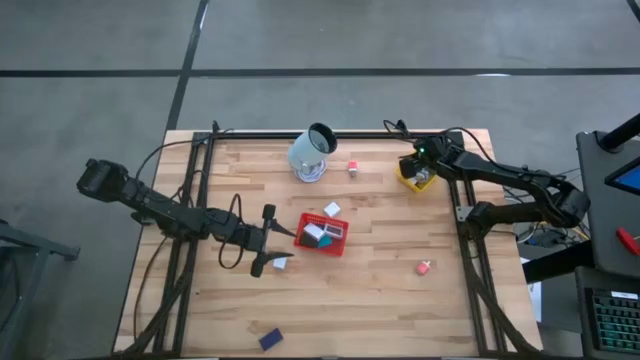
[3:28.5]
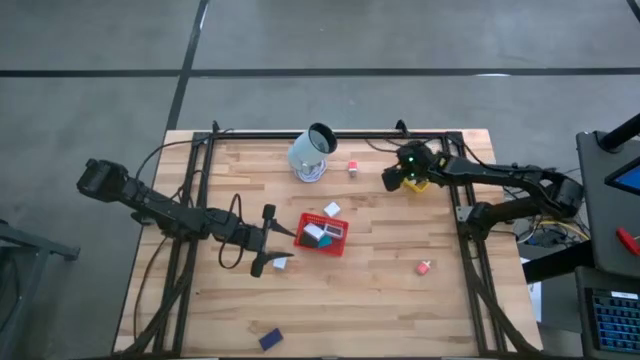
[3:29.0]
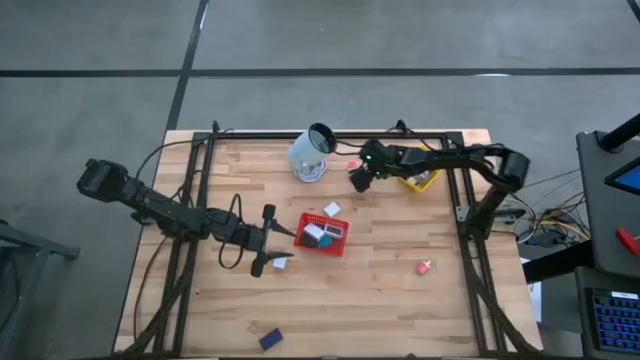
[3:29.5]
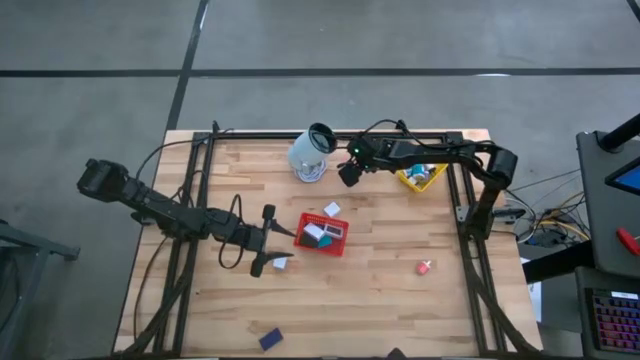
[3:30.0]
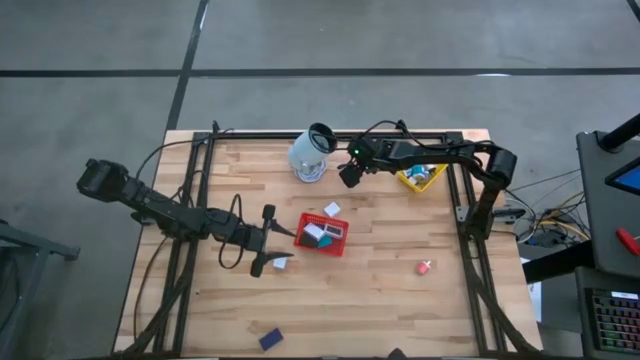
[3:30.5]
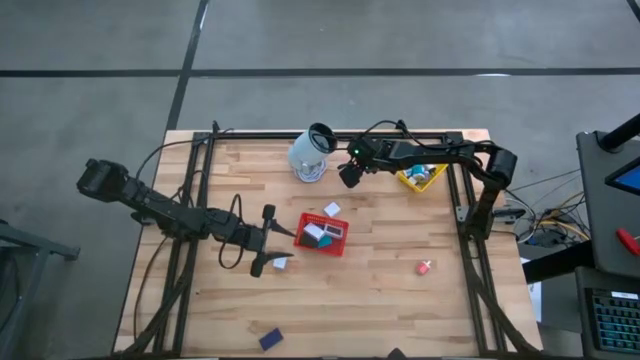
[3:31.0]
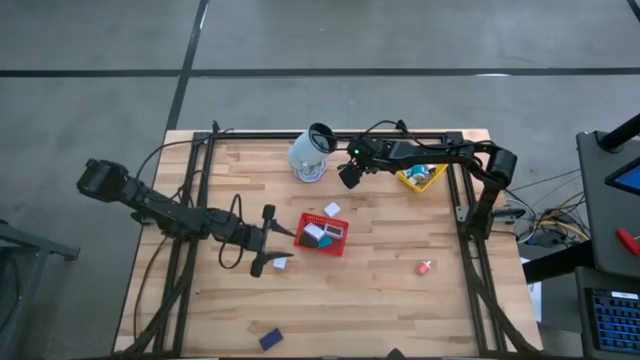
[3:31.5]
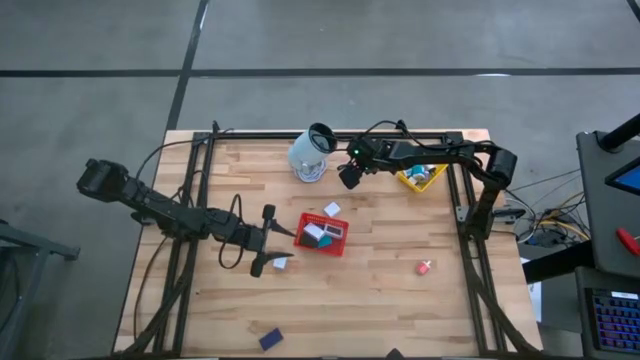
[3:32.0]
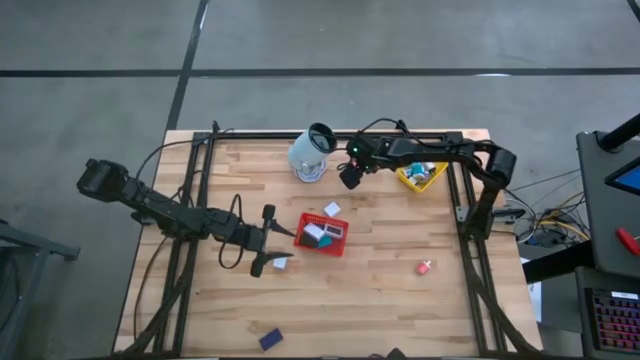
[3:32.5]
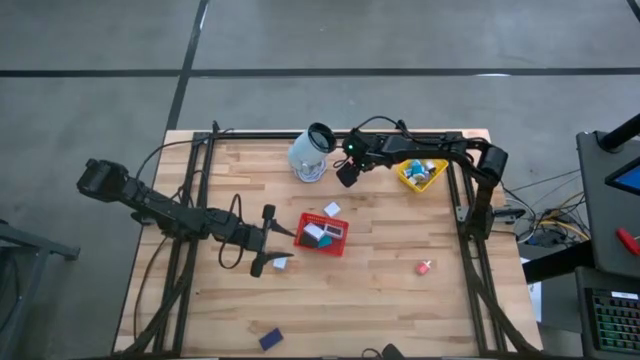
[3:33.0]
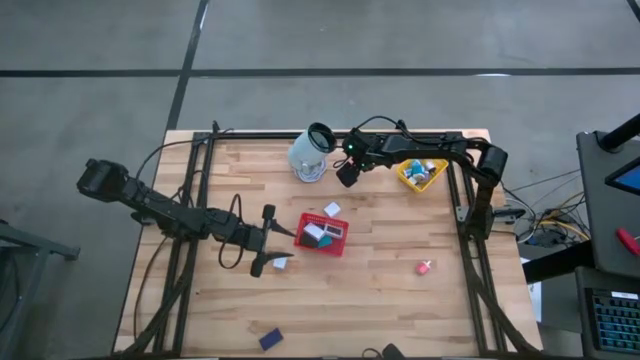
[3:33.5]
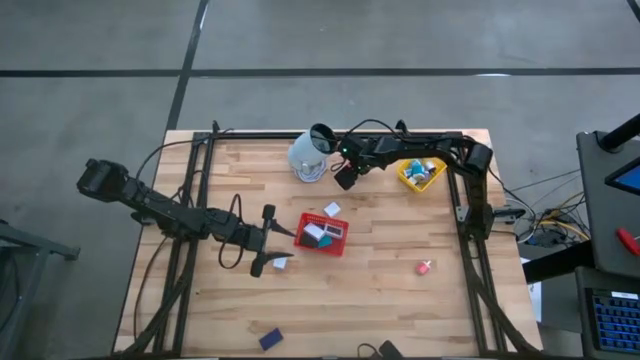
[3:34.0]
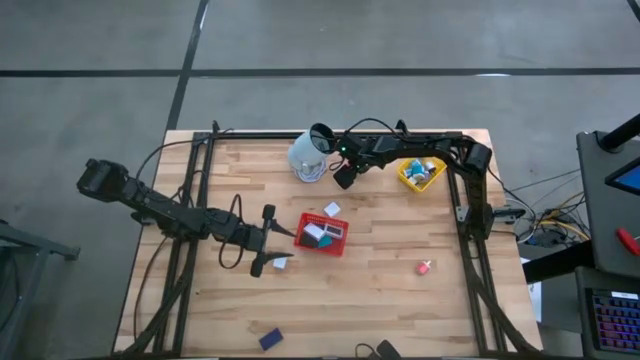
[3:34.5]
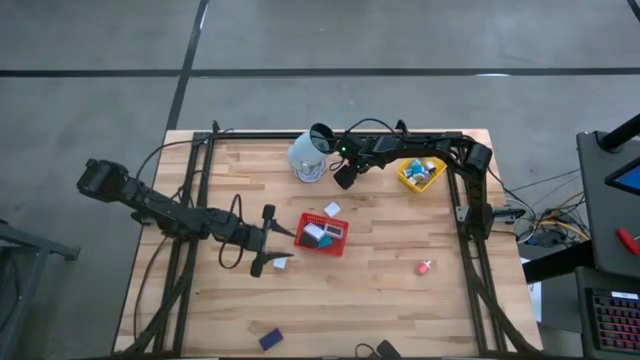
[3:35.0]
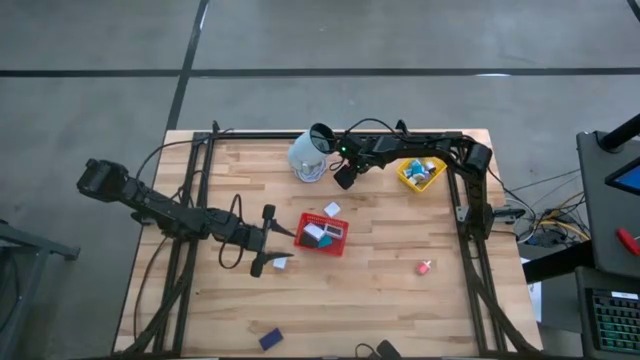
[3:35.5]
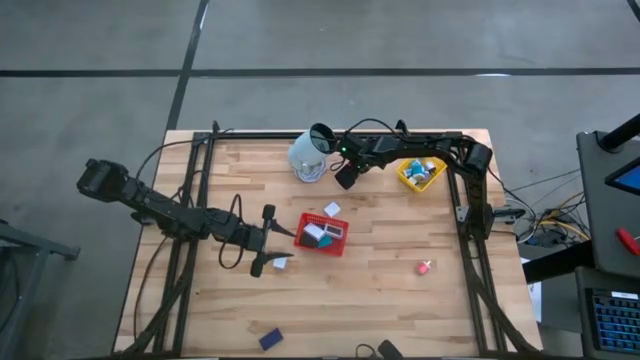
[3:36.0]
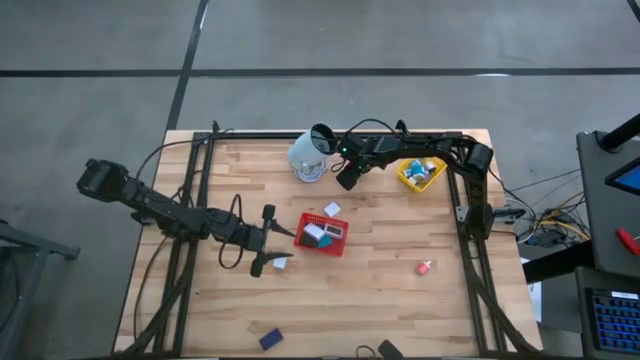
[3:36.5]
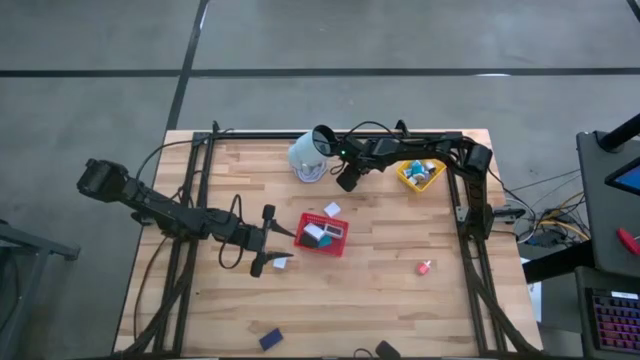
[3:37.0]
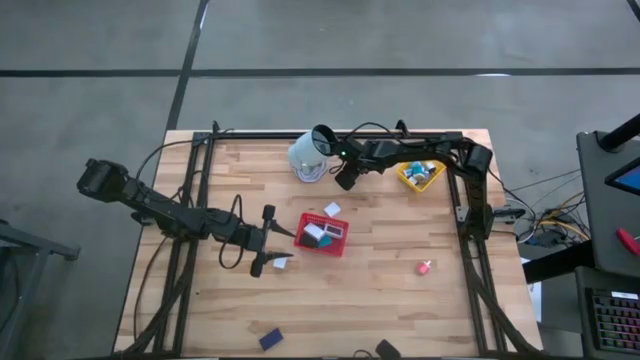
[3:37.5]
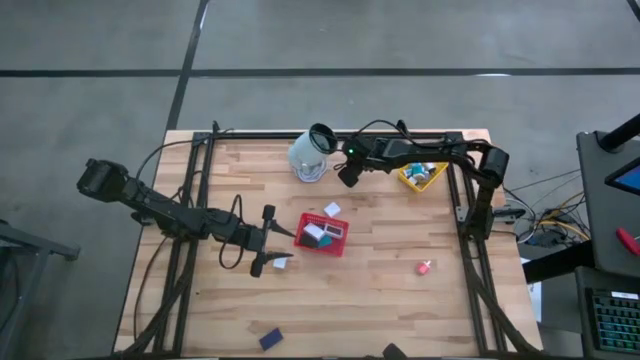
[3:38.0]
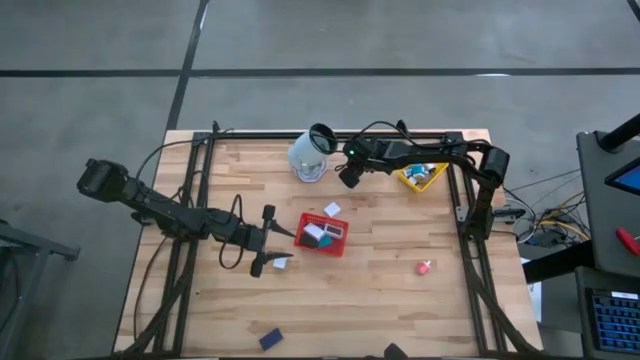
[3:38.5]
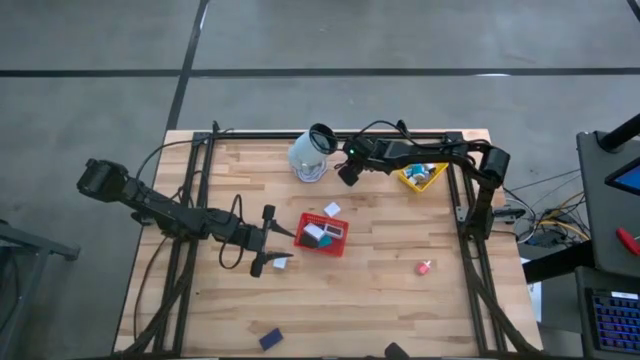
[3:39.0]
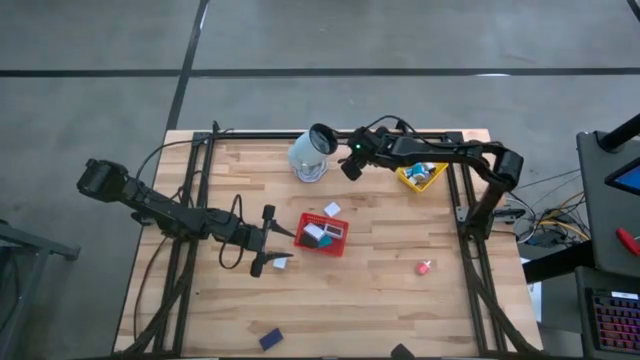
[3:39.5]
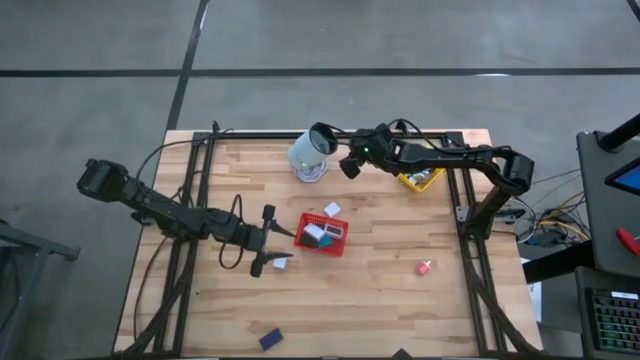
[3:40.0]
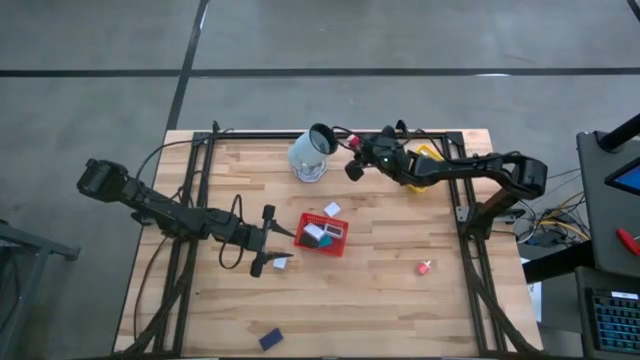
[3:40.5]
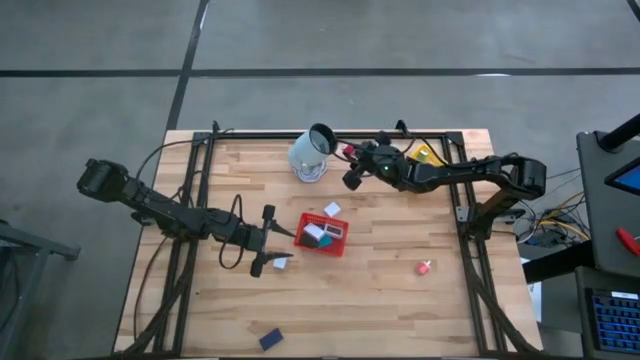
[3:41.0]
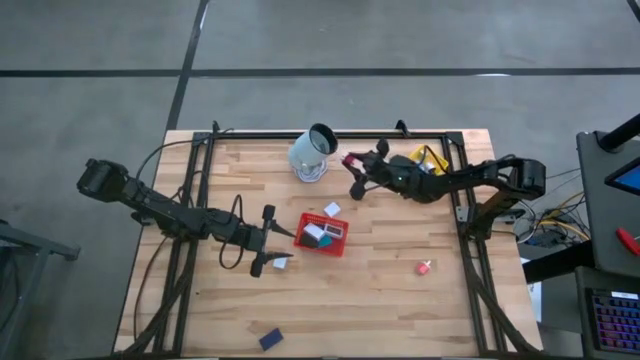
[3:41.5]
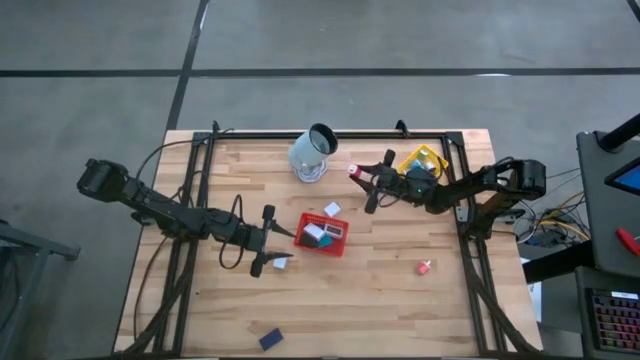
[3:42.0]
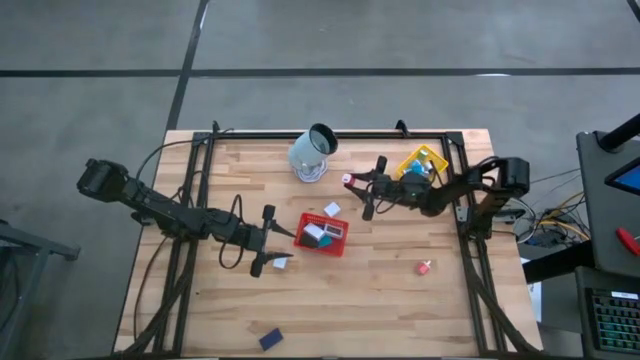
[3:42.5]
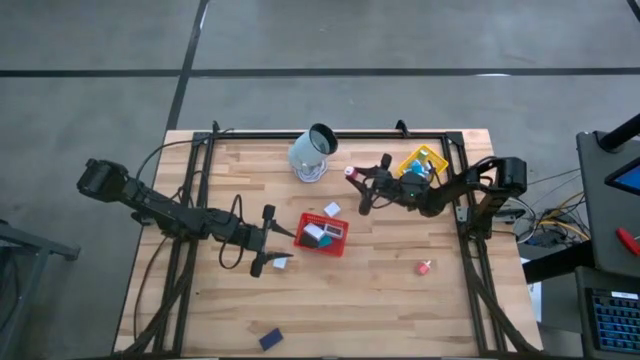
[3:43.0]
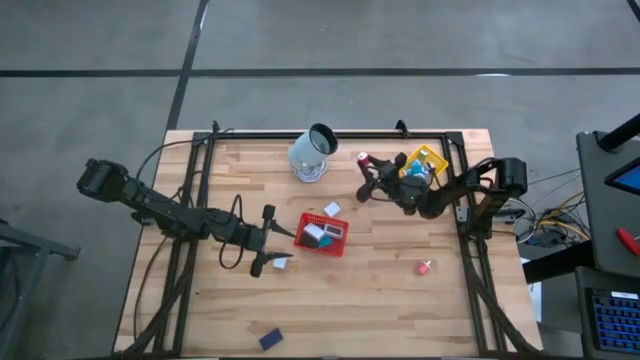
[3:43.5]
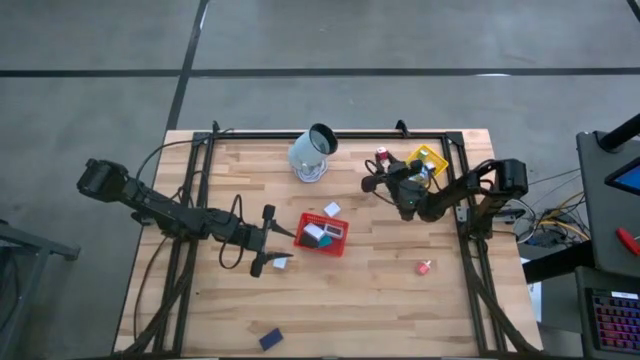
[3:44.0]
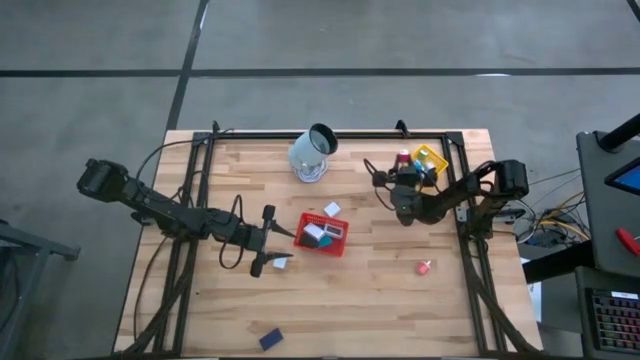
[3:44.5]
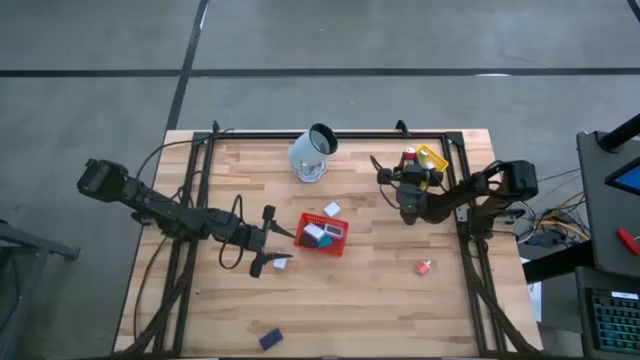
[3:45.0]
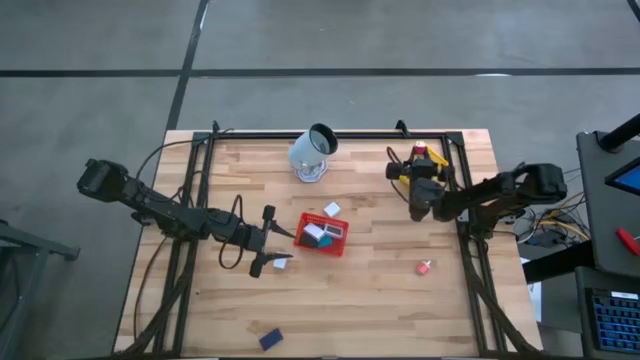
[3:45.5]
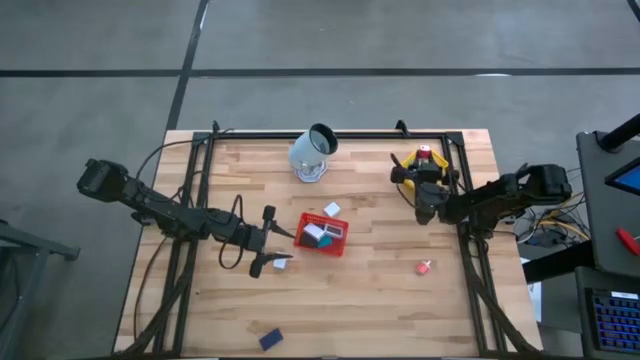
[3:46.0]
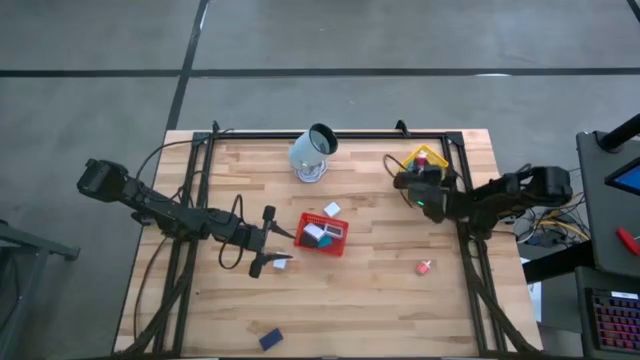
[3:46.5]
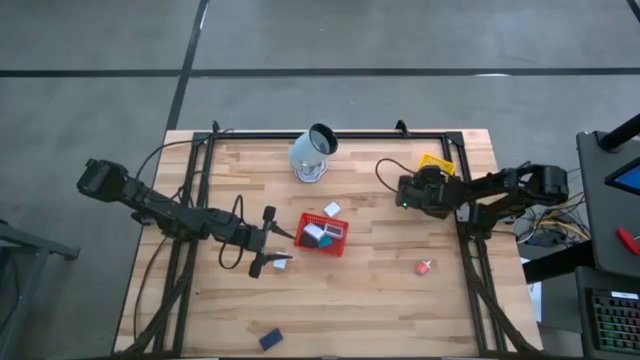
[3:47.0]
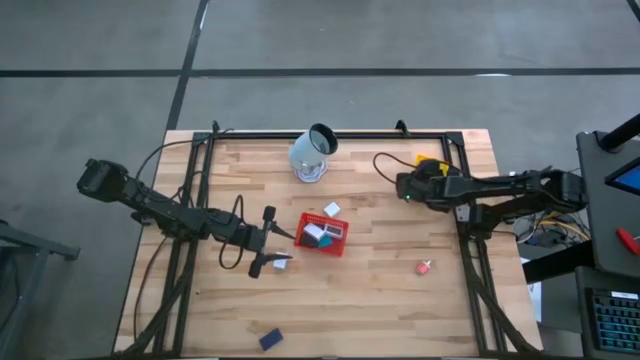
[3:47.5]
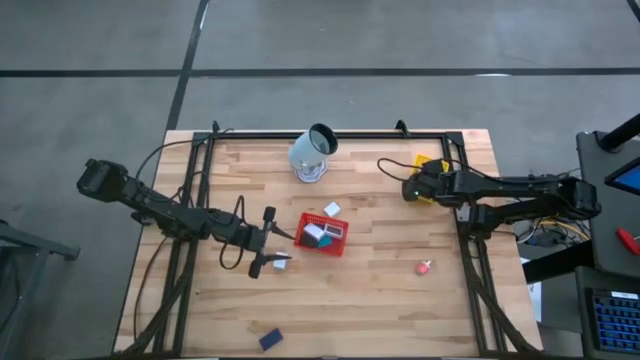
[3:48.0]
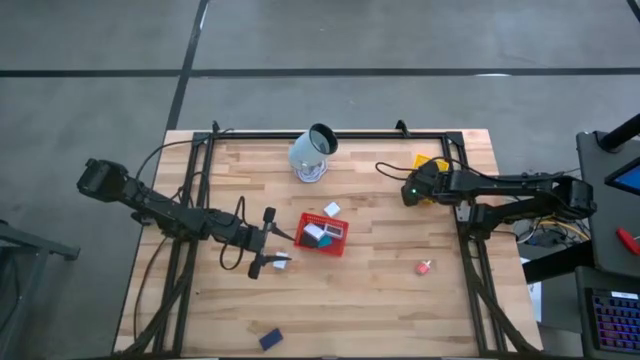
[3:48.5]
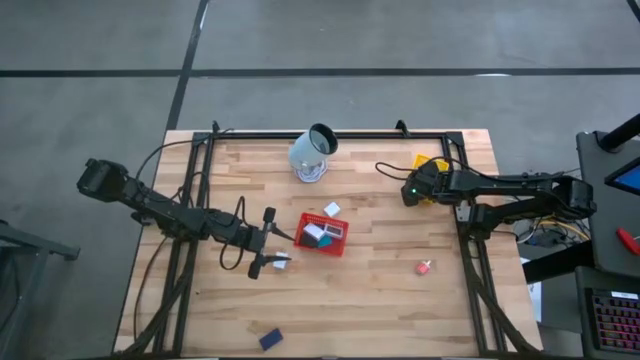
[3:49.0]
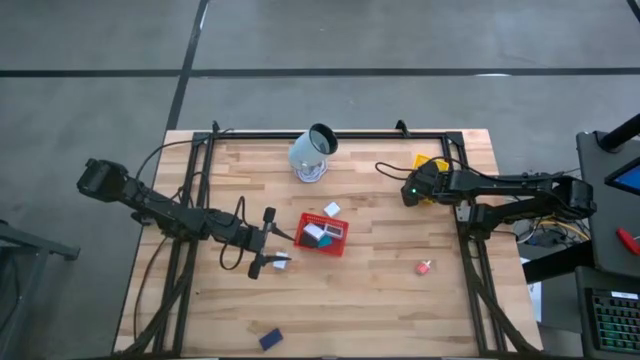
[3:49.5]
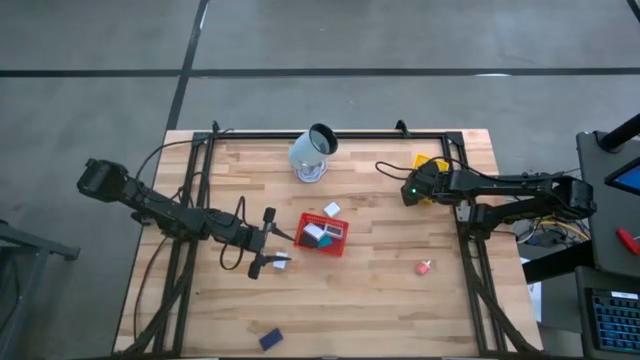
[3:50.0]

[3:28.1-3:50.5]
Task: Pick & Place Office items
Put the top pink charger adapter into the yellow basket
